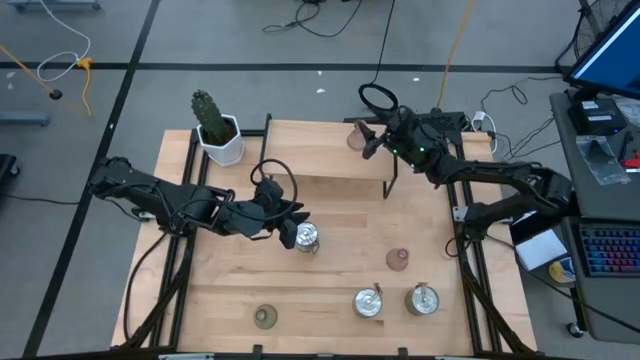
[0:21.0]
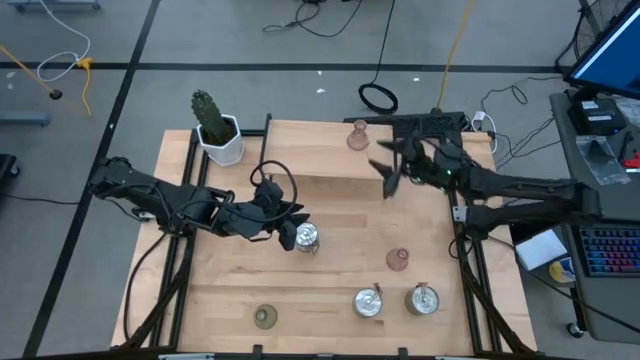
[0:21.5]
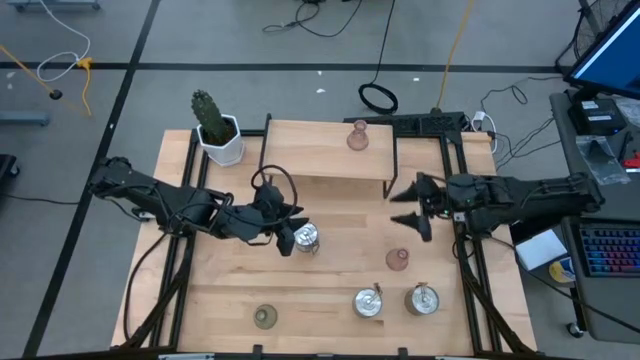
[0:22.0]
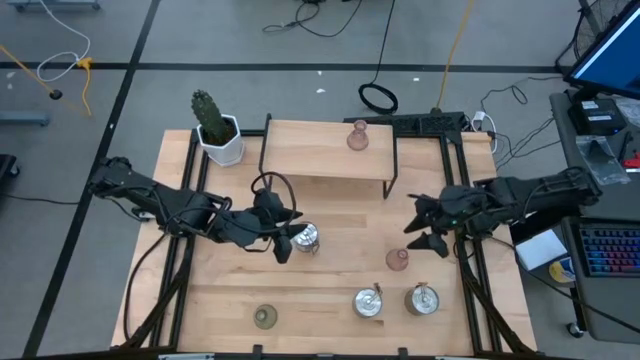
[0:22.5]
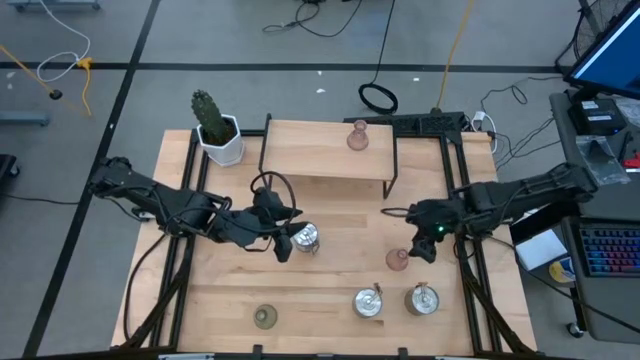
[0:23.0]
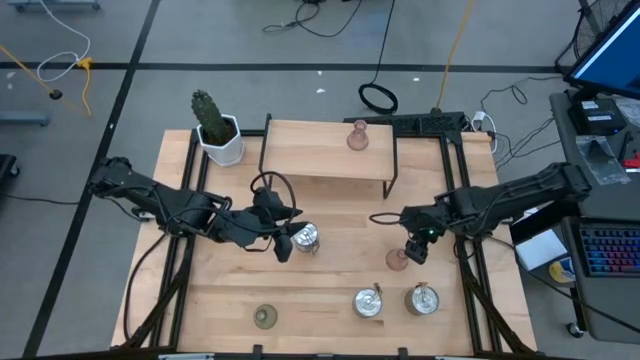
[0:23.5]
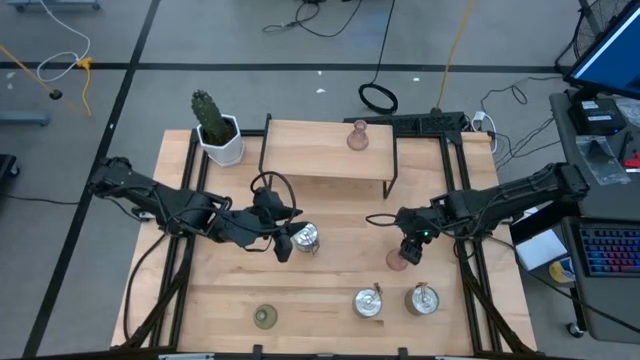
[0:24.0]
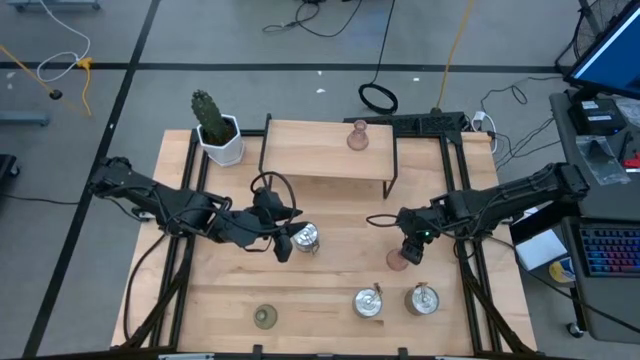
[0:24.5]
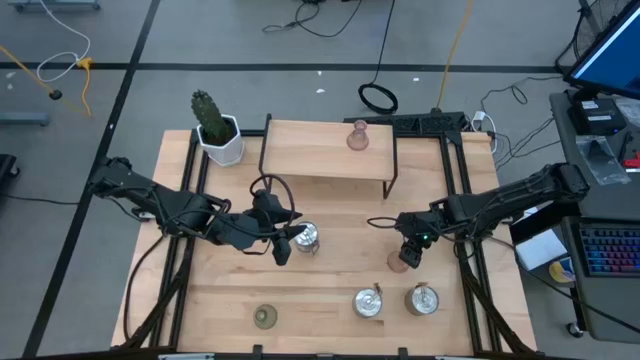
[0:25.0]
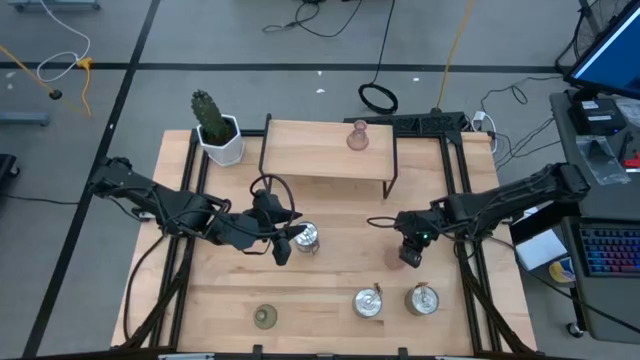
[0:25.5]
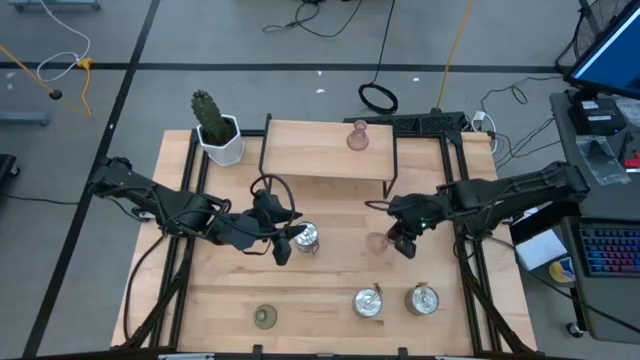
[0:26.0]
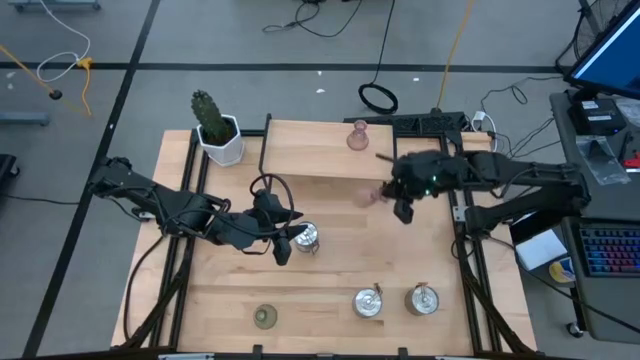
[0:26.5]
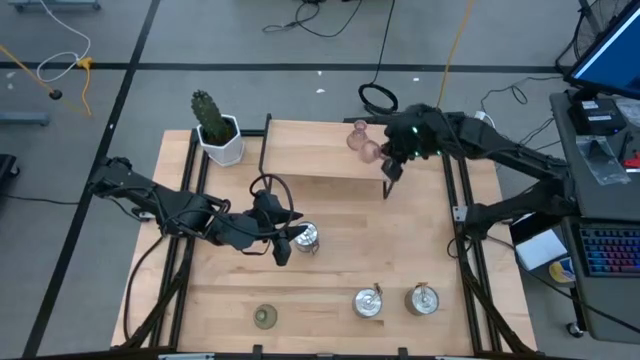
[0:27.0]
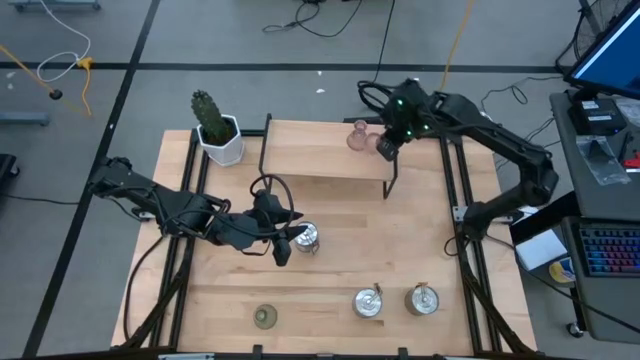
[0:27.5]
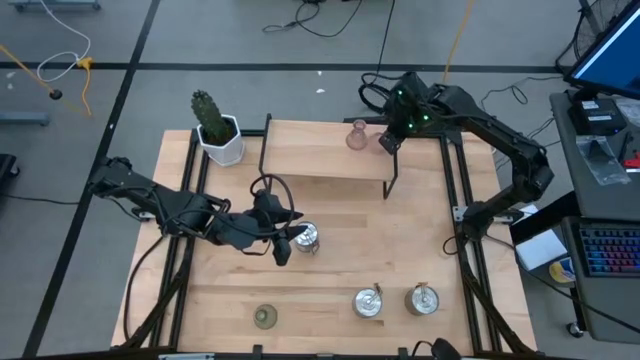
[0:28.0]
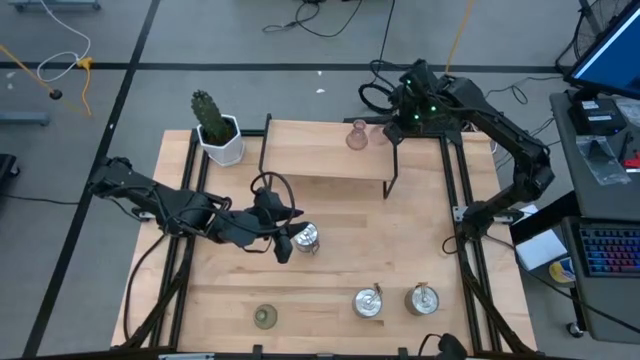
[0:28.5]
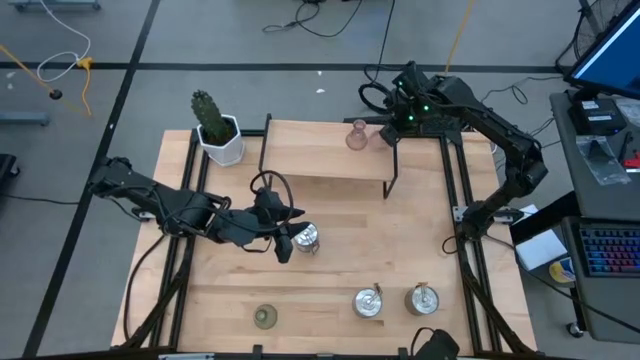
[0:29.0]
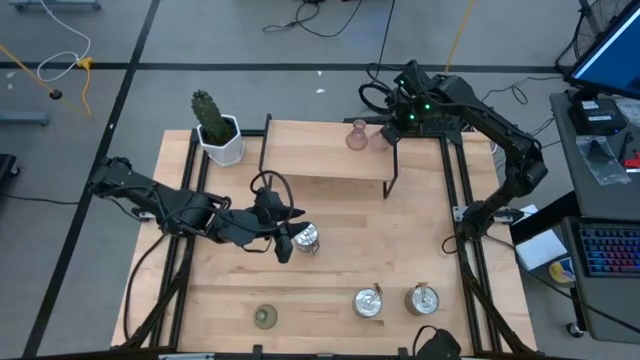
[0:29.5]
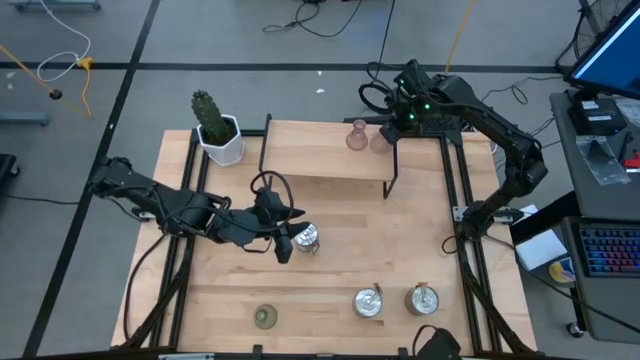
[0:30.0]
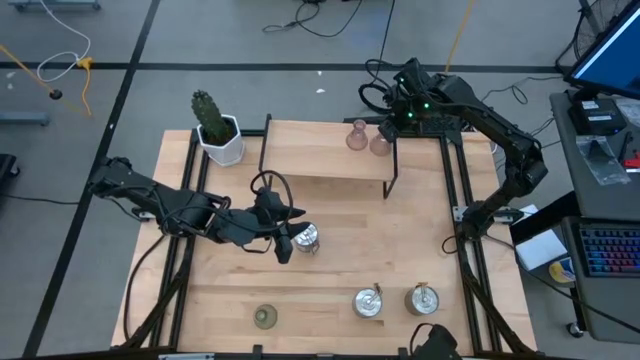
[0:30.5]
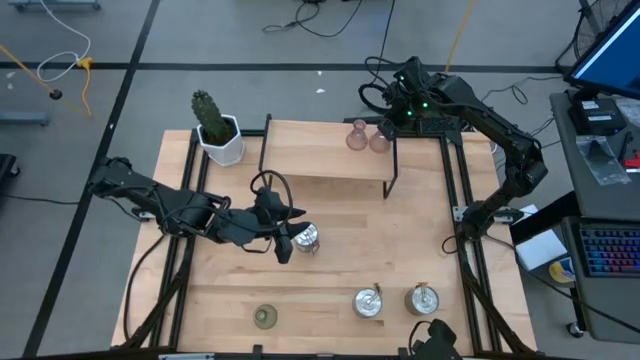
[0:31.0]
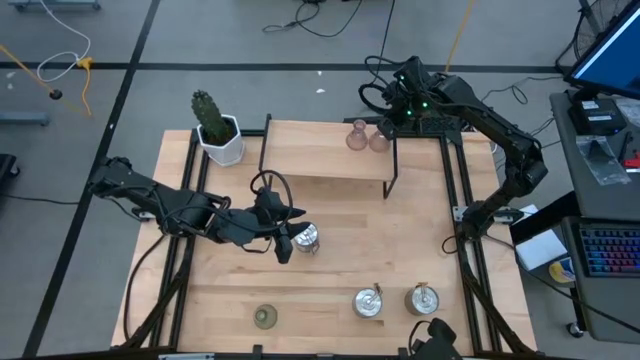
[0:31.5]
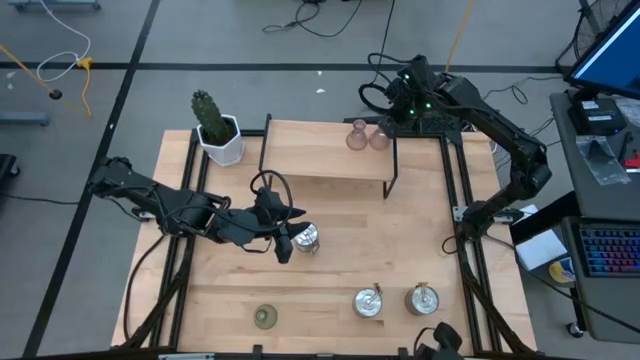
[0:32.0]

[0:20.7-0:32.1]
Task: Pick & Place candle stick holders
Put the red candle holder on the shelf

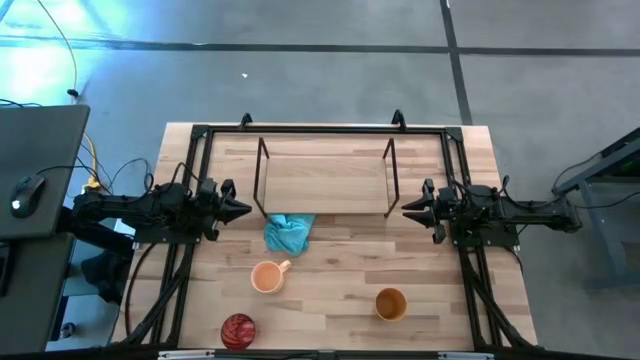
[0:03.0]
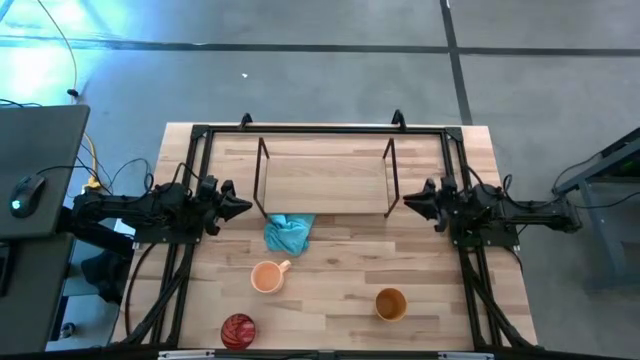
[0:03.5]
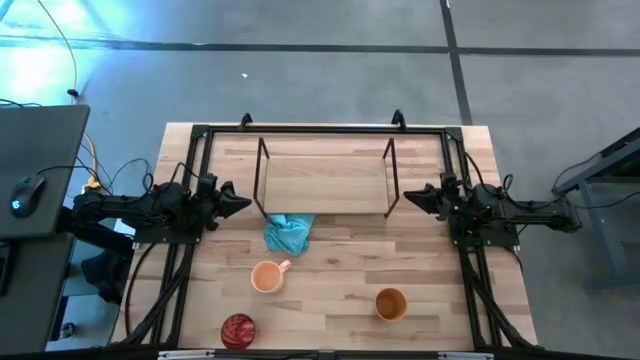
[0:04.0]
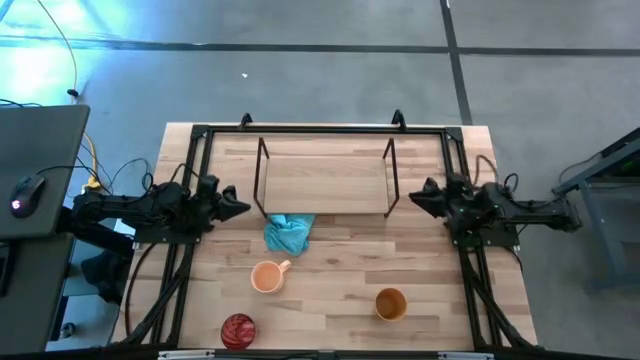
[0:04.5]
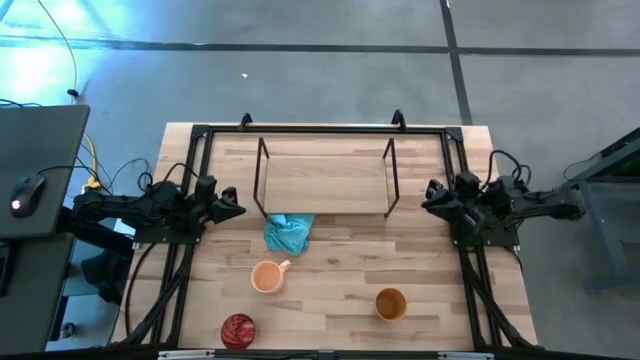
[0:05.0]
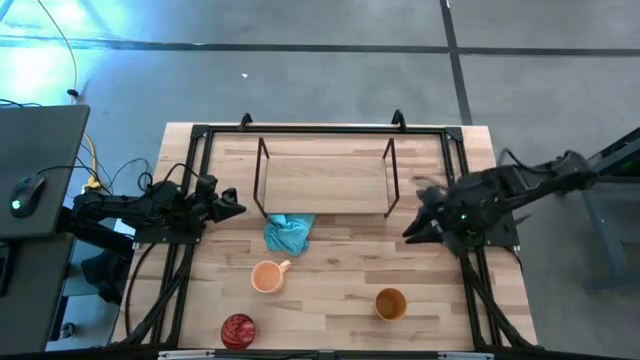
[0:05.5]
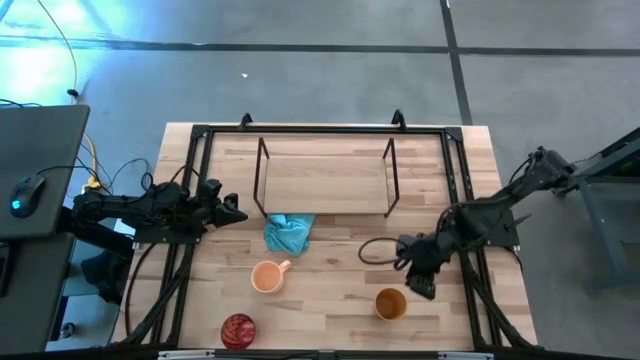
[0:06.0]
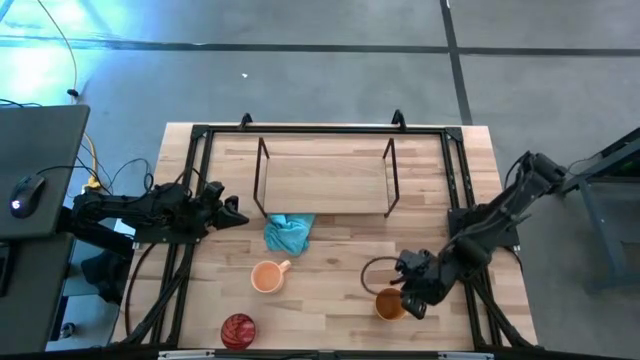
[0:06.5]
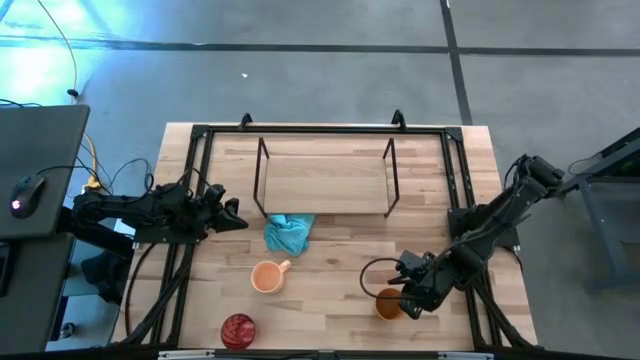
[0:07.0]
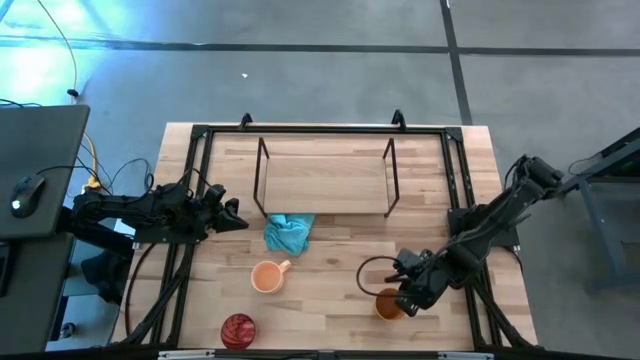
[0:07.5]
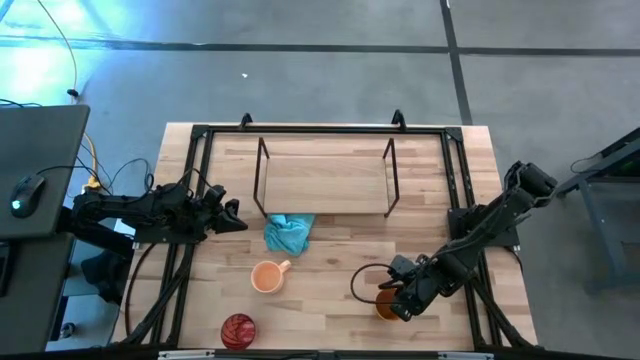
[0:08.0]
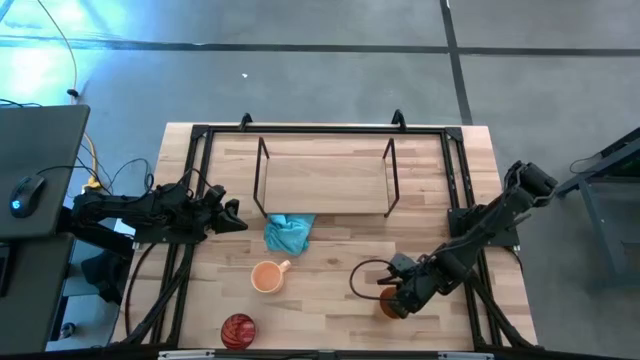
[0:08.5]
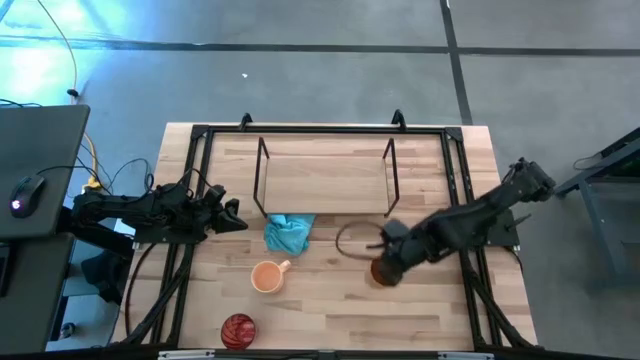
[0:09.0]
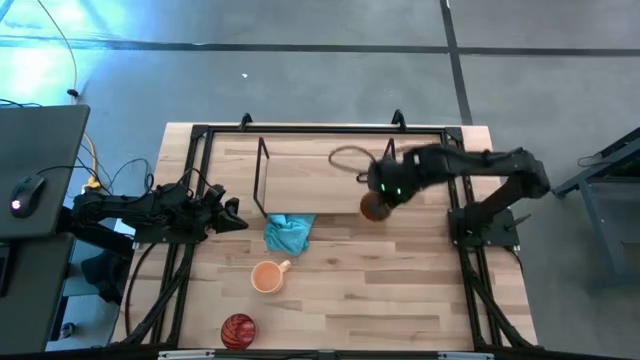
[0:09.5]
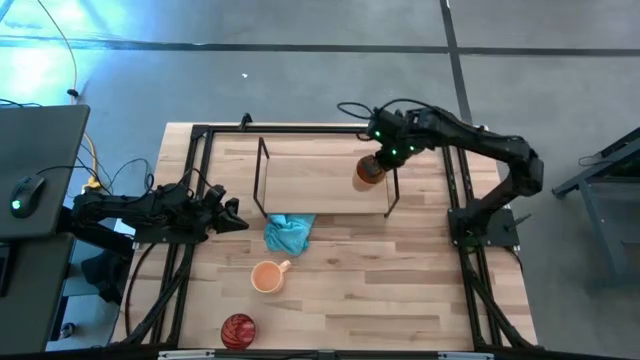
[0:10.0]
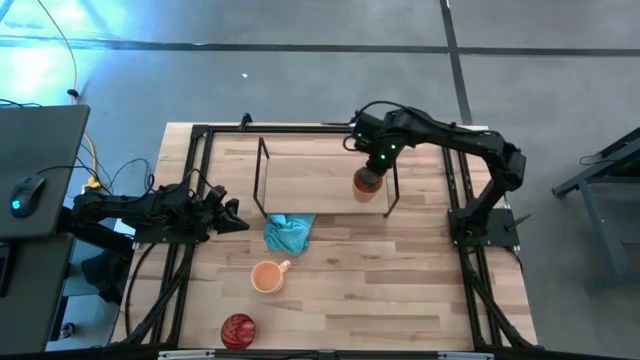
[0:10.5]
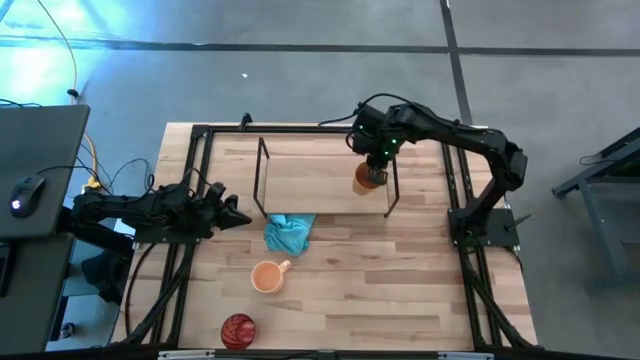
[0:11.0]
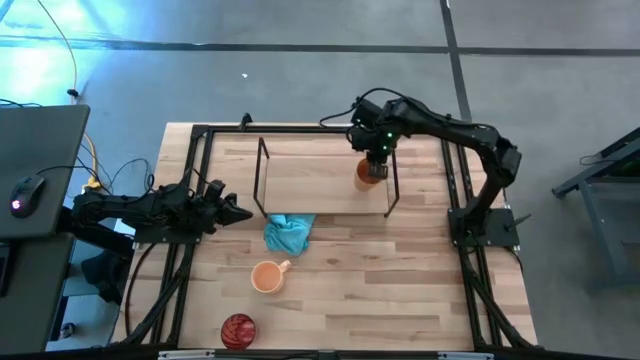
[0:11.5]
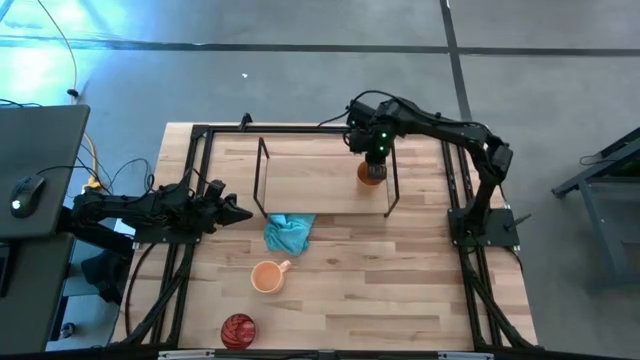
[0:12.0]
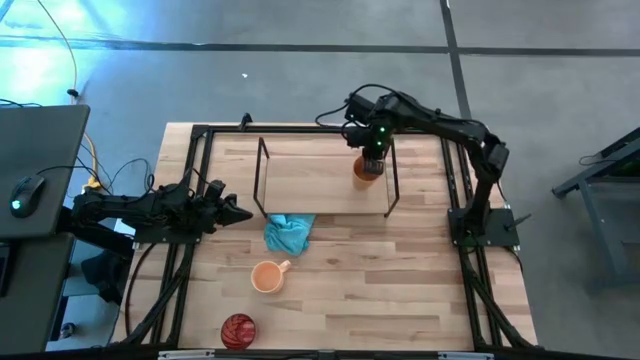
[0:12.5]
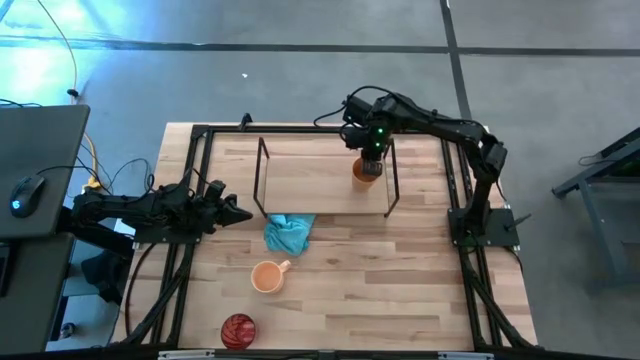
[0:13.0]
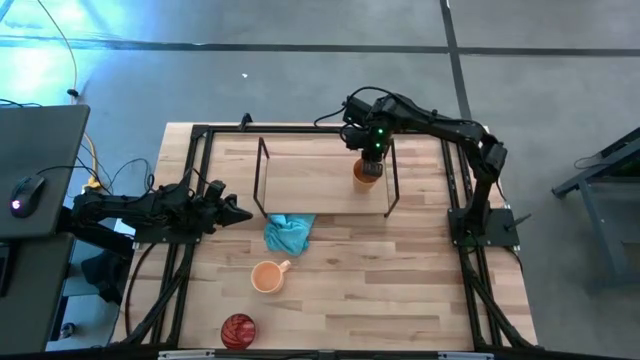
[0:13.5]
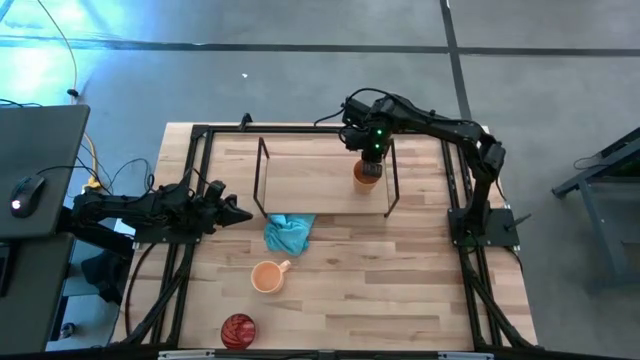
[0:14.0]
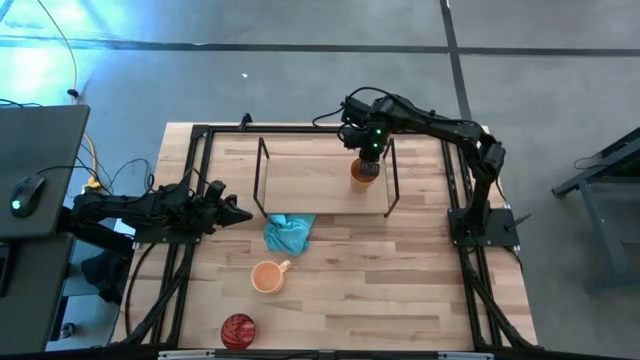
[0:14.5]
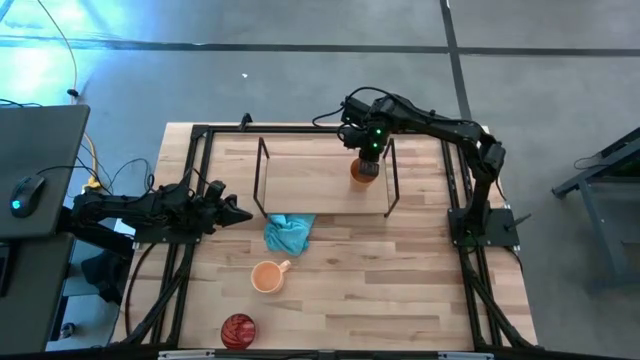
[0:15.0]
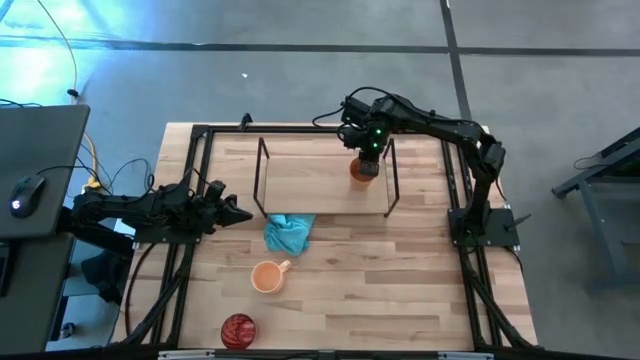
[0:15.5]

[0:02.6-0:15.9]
Task: Stack small to large cups/mugs on shelf
Put the orange cup on the shelf
